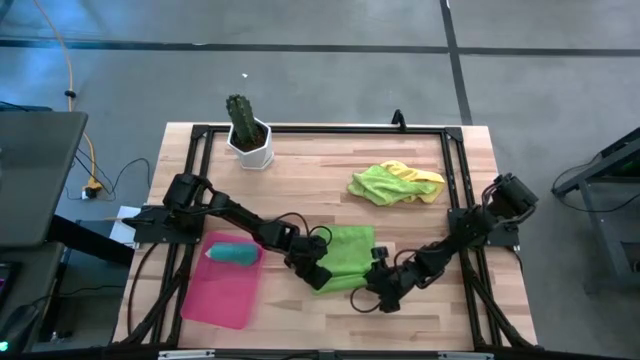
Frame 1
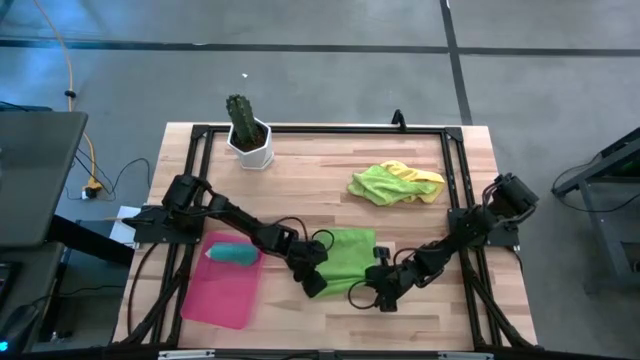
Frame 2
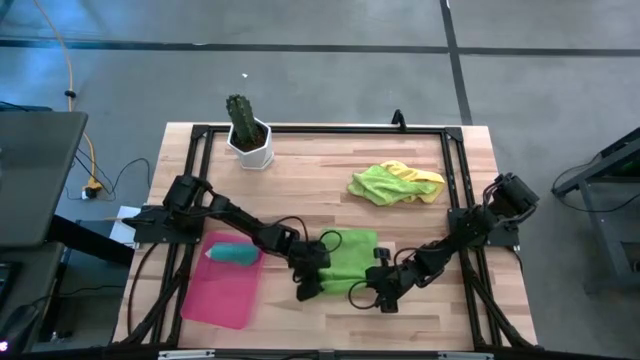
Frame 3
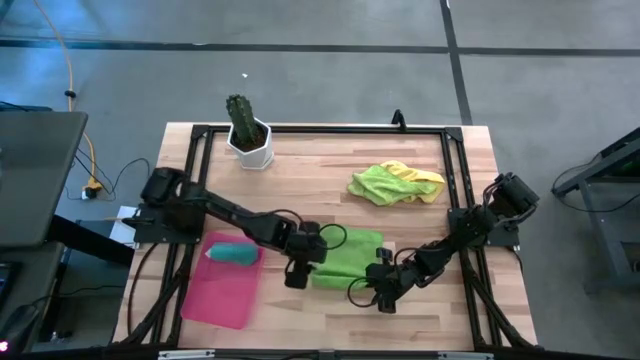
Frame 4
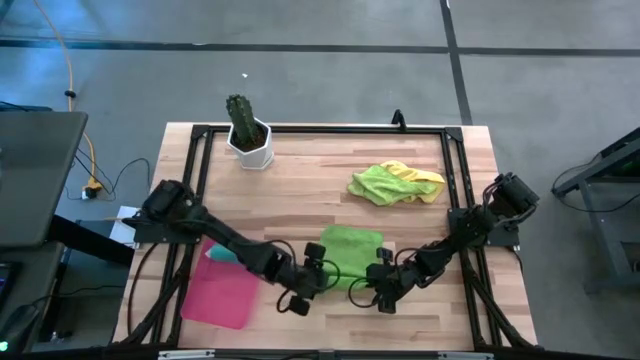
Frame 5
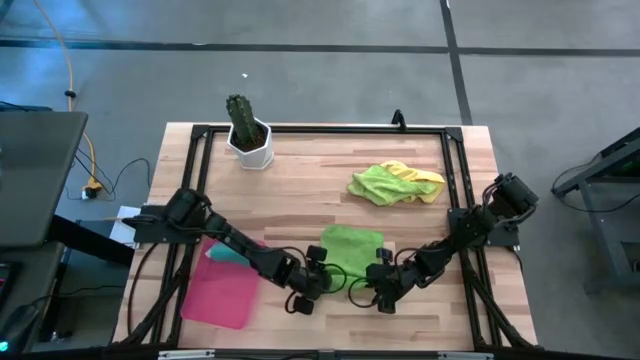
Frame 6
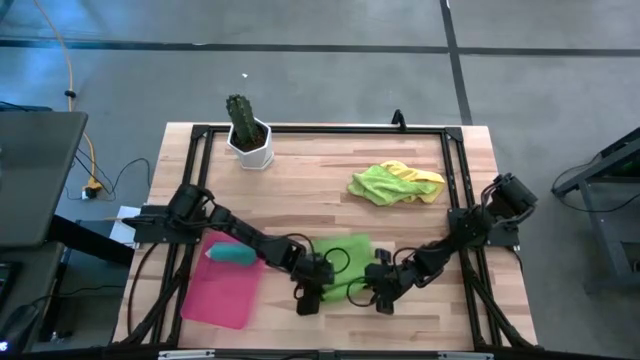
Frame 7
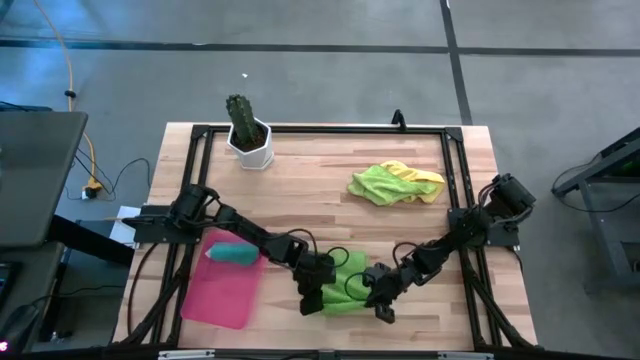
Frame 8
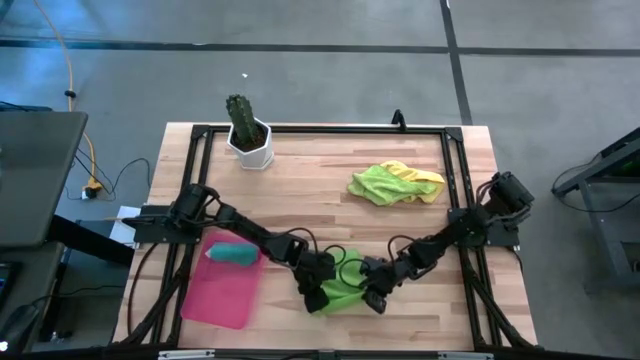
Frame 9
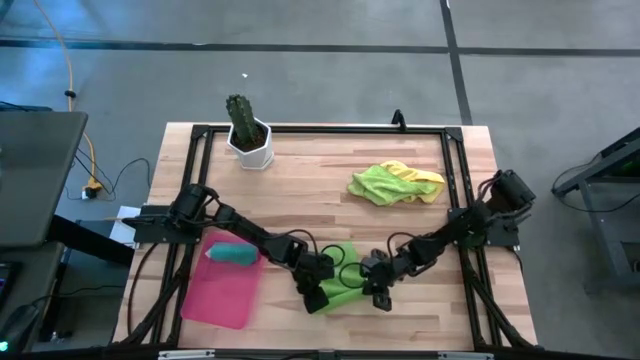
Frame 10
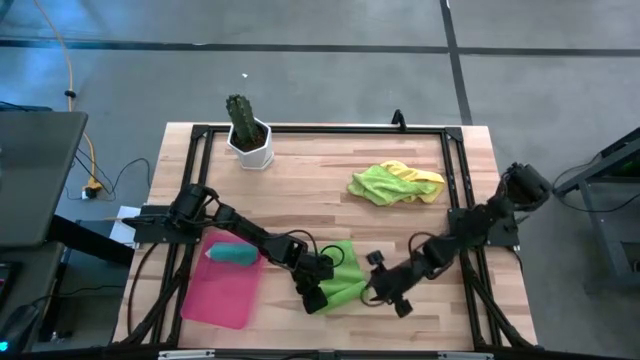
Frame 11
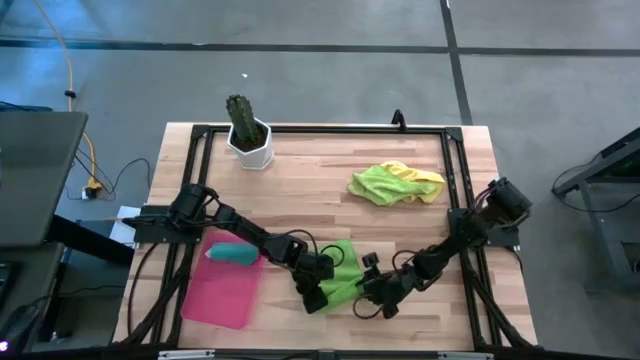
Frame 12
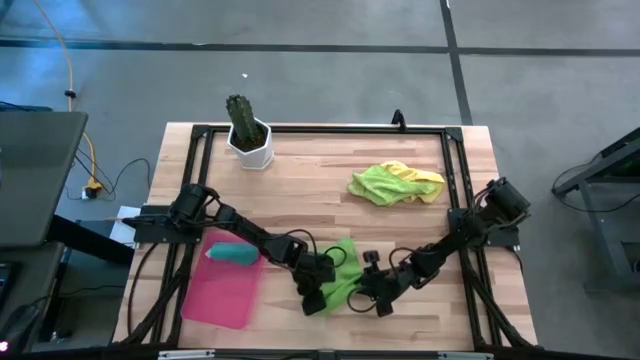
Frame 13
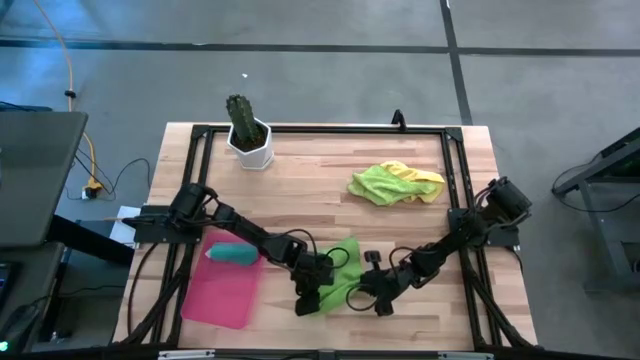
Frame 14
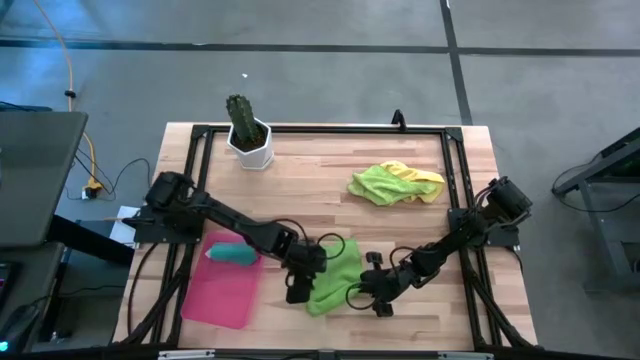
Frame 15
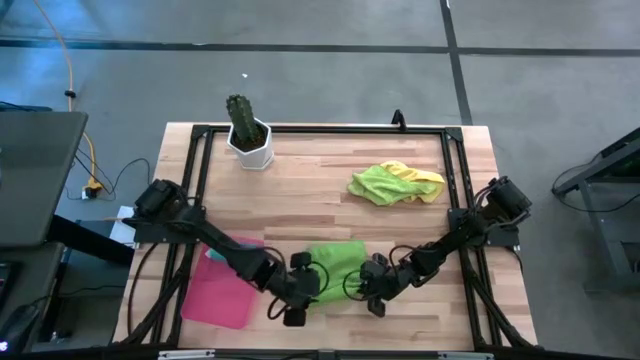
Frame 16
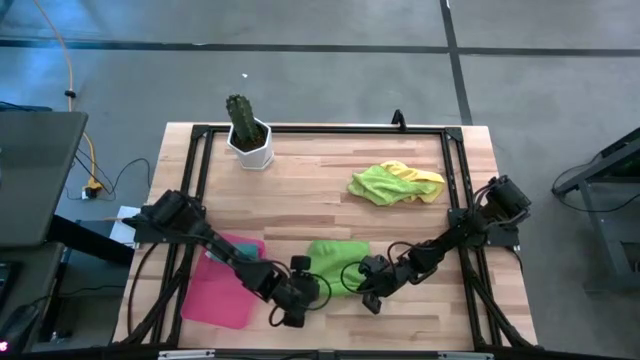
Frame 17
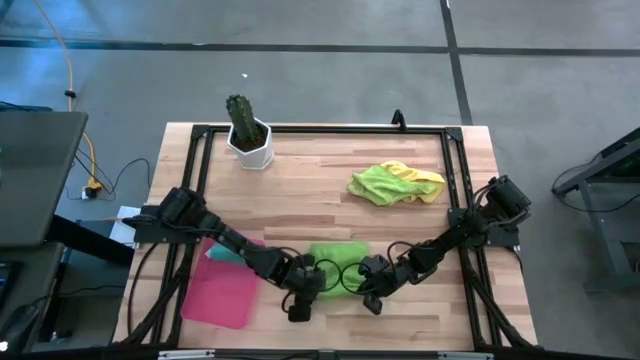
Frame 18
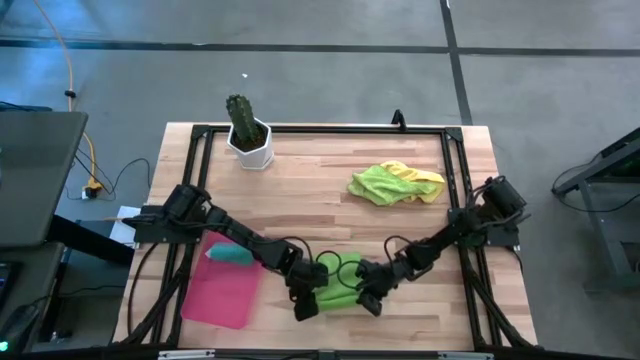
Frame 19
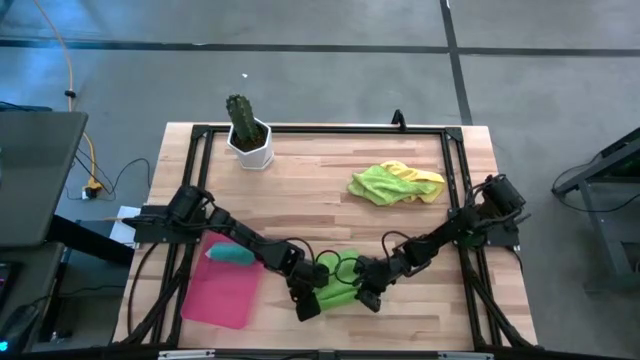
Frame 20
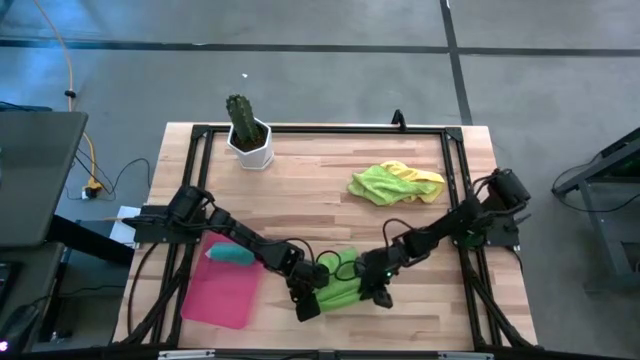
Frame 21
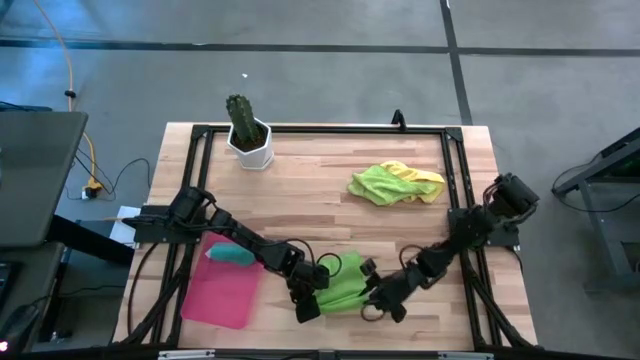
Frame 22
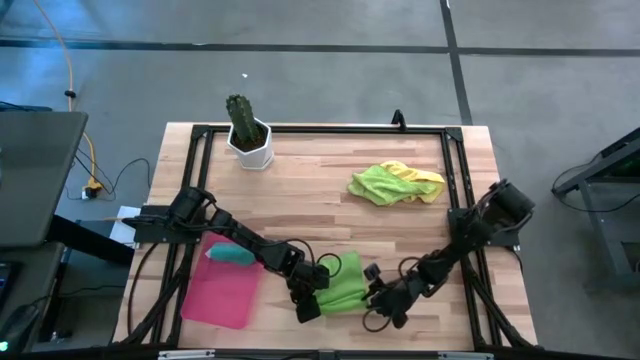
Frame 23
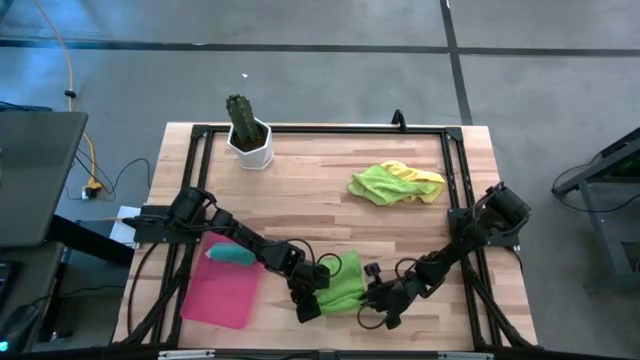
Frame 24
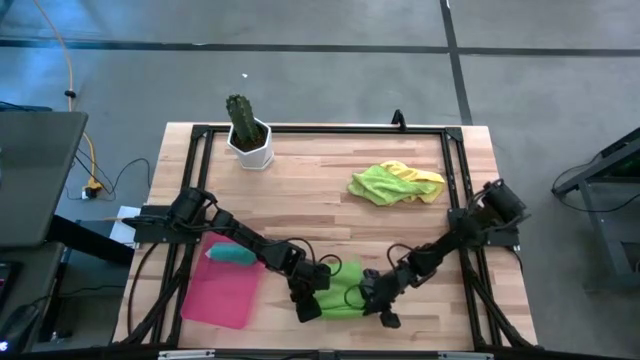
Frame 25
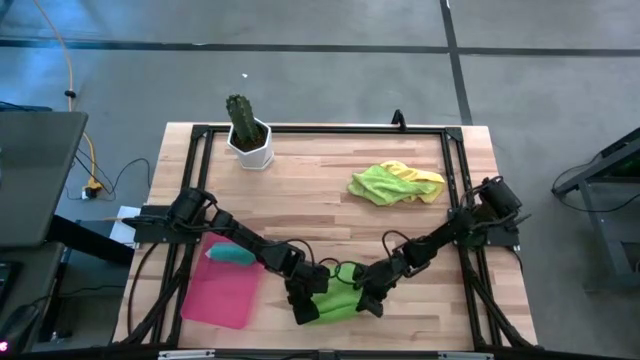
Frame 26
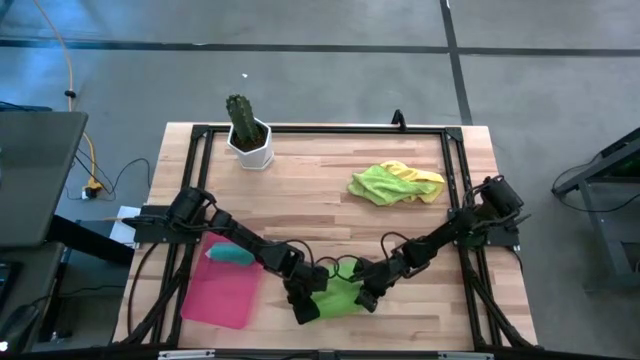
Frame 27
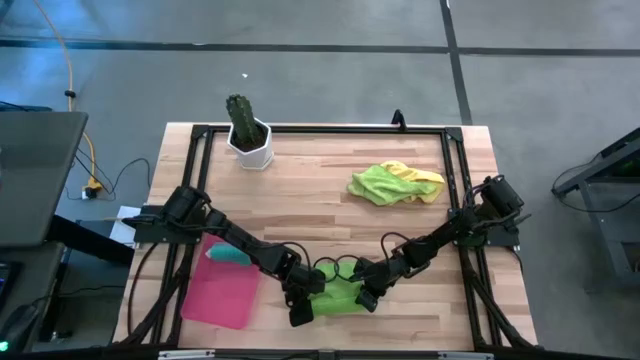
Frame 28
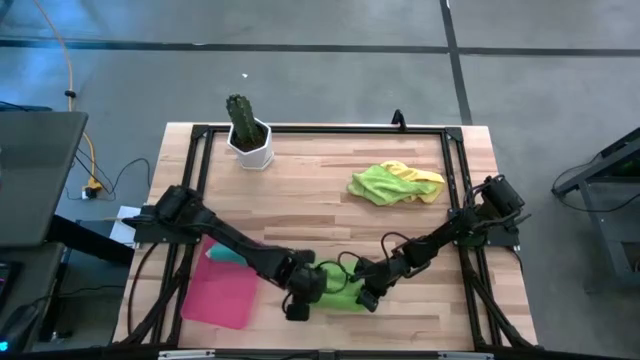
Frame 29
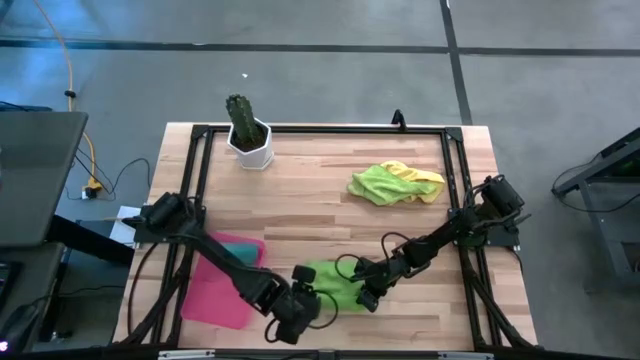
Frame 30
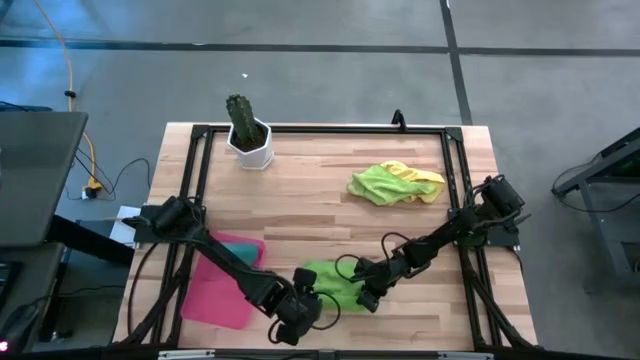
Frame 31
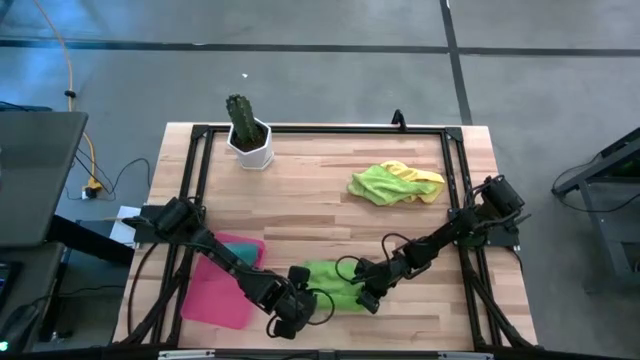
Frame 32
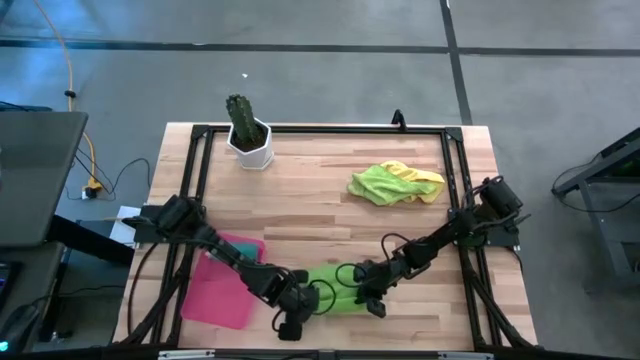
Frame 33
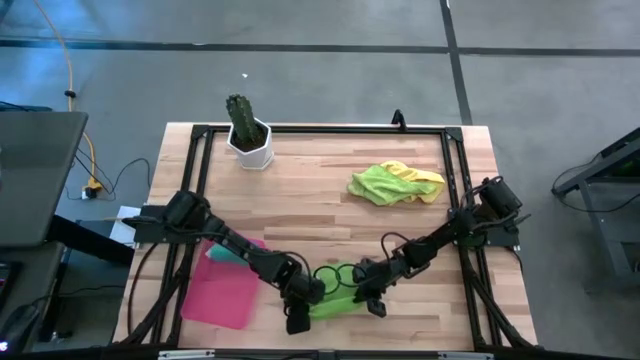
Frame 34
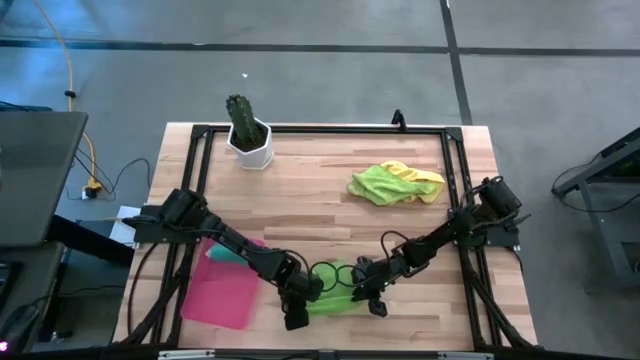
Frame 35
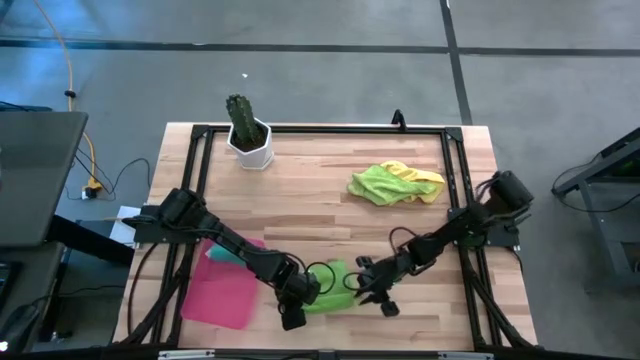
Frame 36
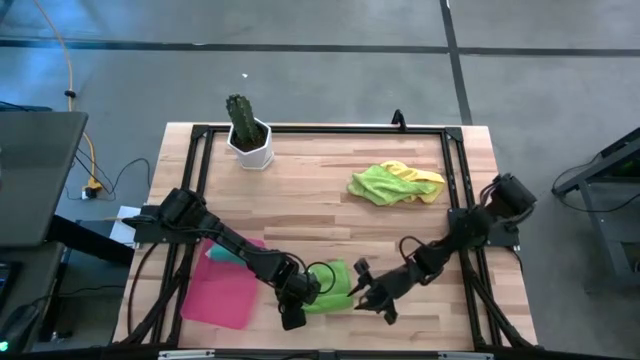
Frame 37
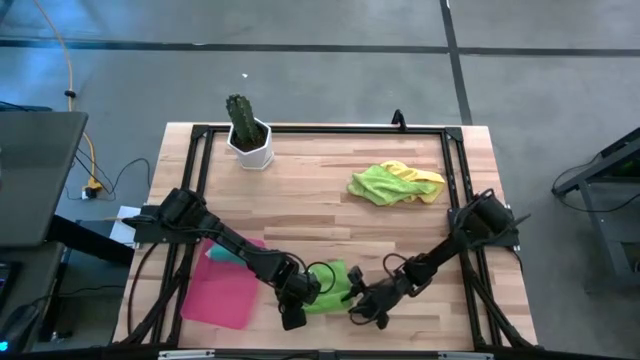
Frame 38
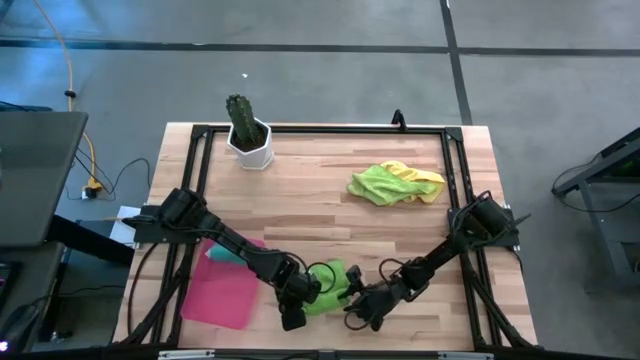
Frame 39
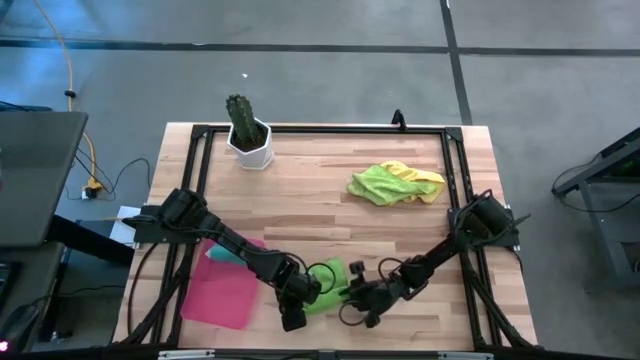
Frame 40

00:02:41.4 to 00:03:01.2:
Task: Roll microfiber towels into tight, uniform cylinder then place into a basket
Roll the dark green towel
